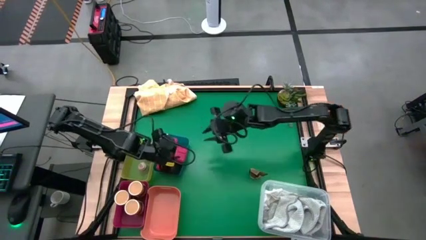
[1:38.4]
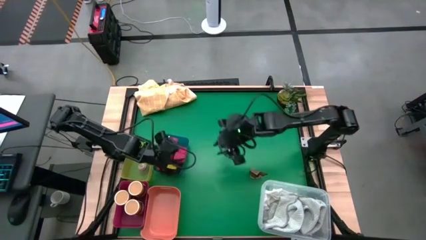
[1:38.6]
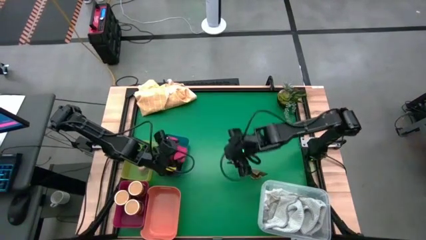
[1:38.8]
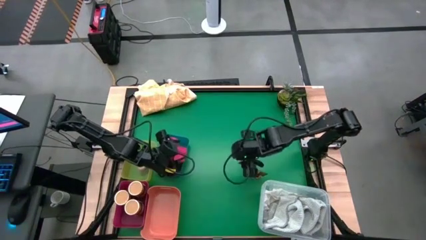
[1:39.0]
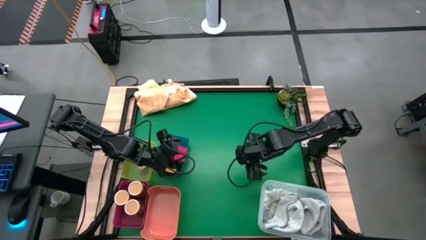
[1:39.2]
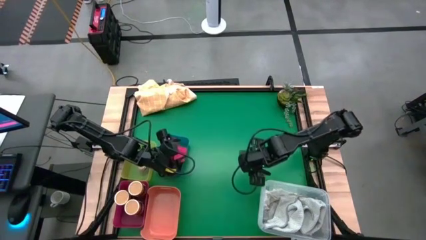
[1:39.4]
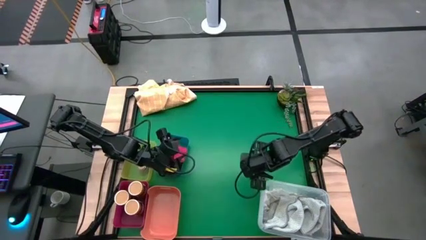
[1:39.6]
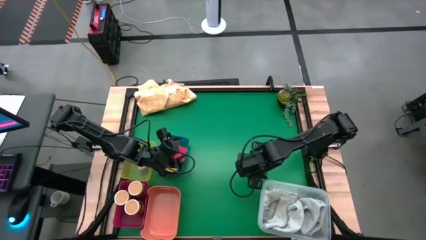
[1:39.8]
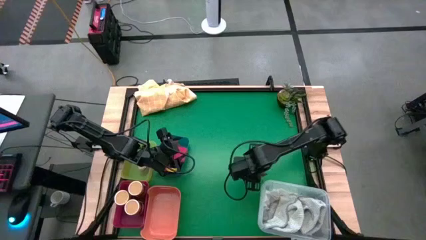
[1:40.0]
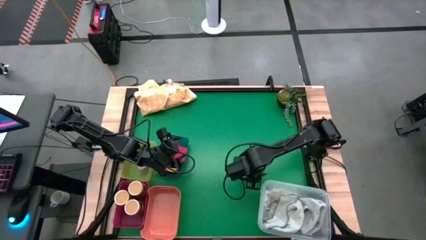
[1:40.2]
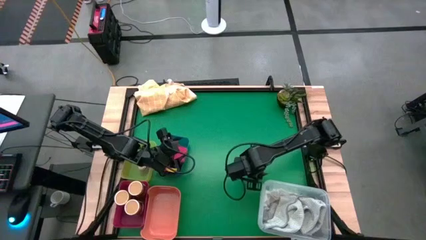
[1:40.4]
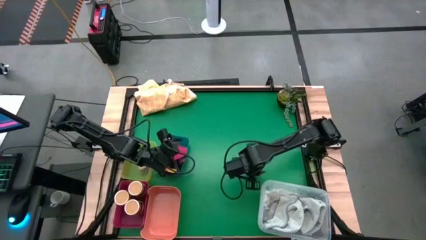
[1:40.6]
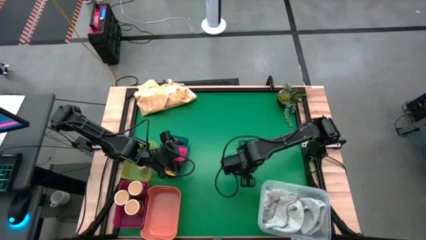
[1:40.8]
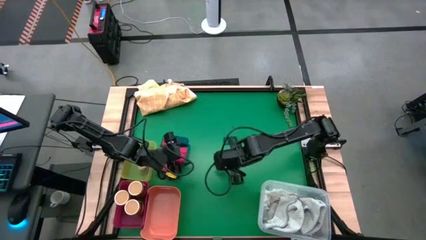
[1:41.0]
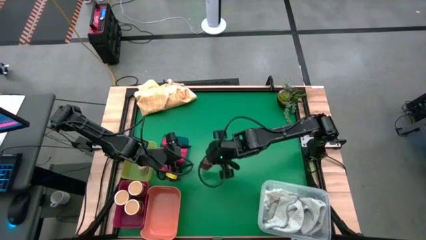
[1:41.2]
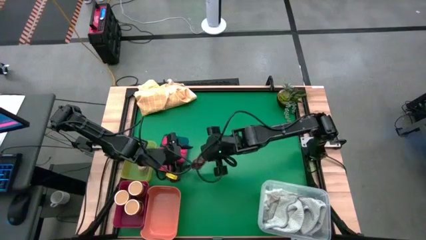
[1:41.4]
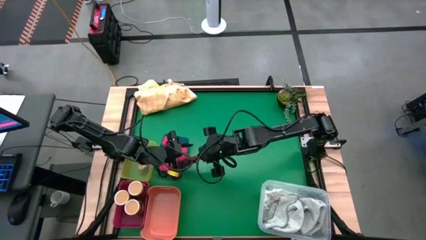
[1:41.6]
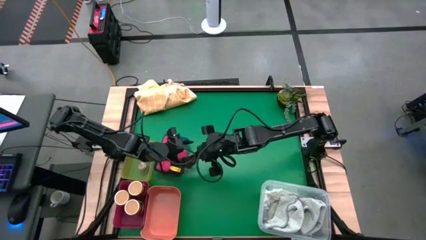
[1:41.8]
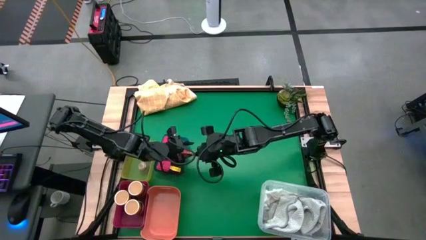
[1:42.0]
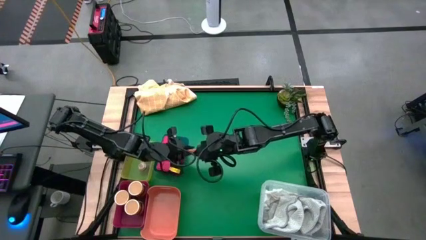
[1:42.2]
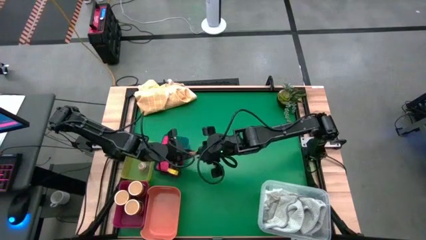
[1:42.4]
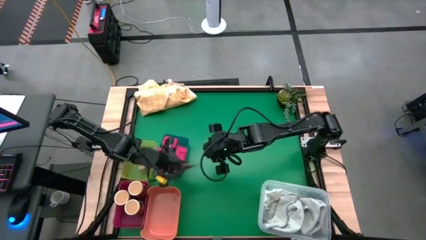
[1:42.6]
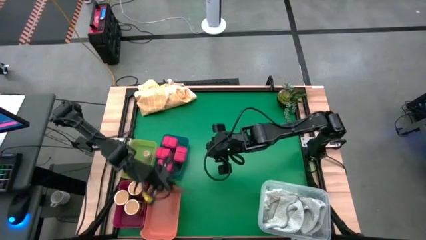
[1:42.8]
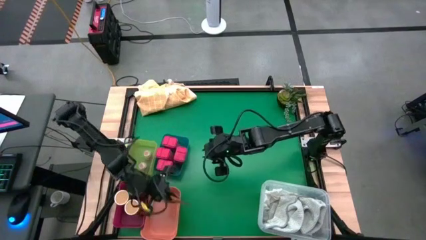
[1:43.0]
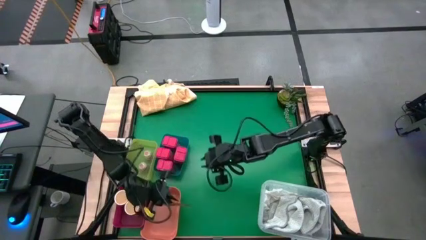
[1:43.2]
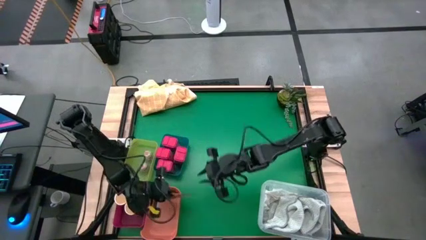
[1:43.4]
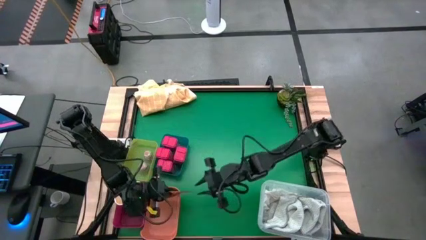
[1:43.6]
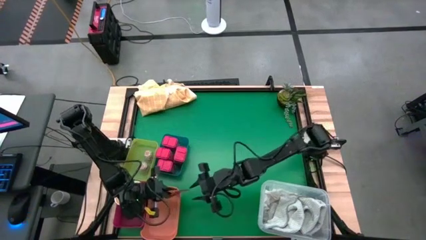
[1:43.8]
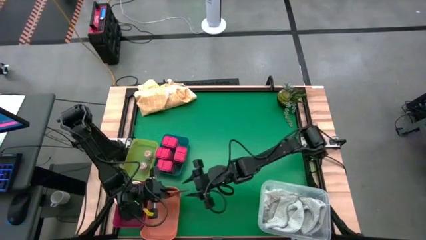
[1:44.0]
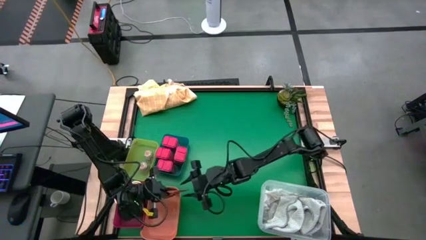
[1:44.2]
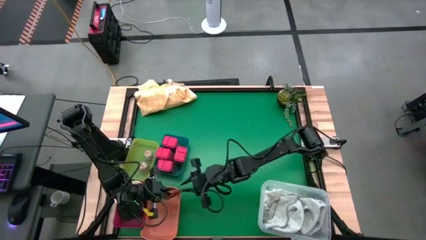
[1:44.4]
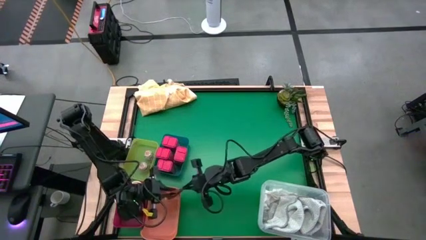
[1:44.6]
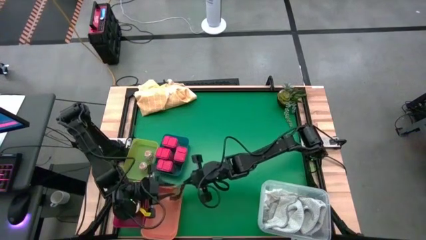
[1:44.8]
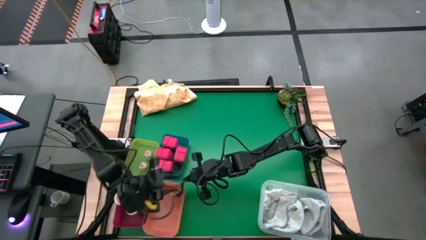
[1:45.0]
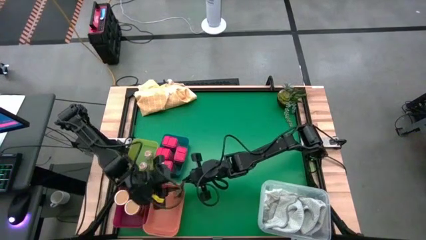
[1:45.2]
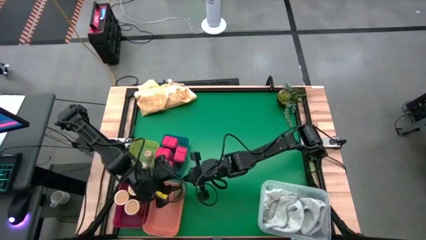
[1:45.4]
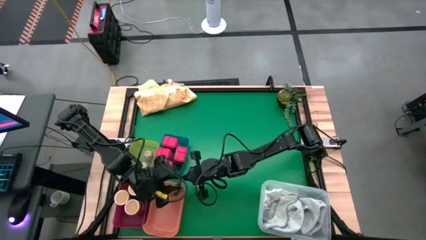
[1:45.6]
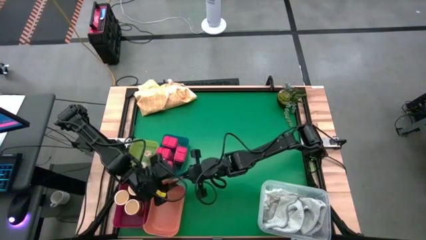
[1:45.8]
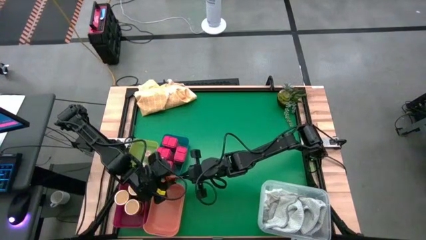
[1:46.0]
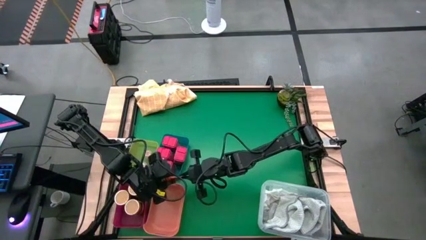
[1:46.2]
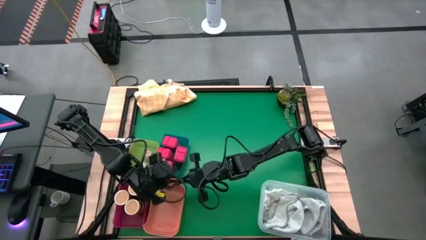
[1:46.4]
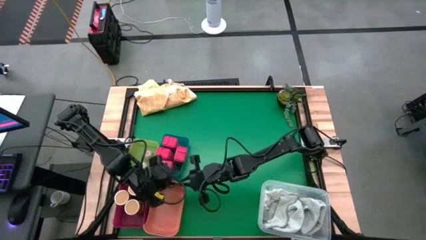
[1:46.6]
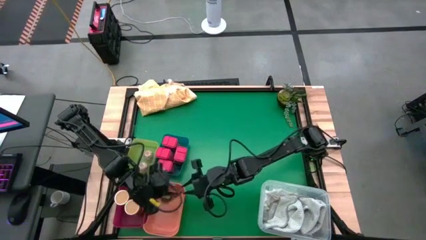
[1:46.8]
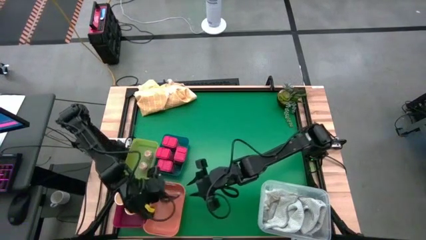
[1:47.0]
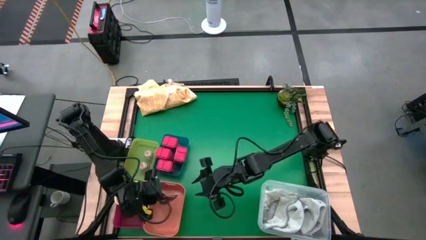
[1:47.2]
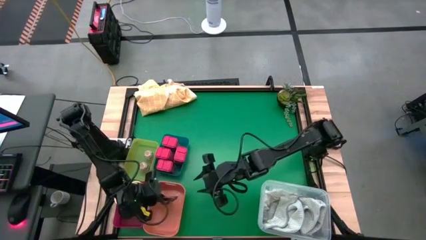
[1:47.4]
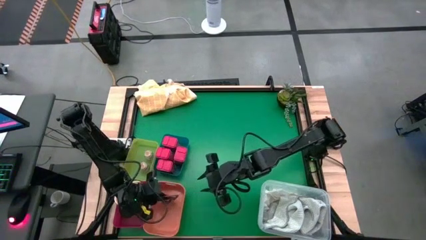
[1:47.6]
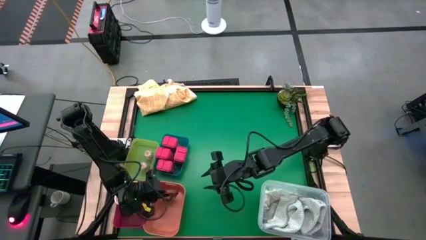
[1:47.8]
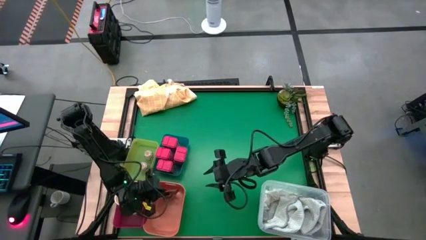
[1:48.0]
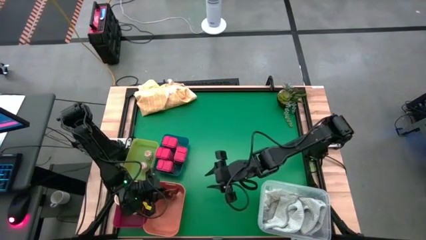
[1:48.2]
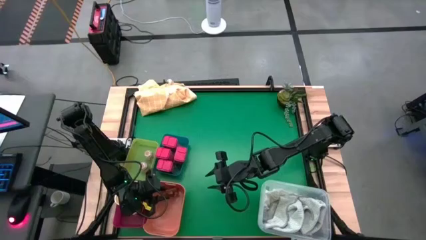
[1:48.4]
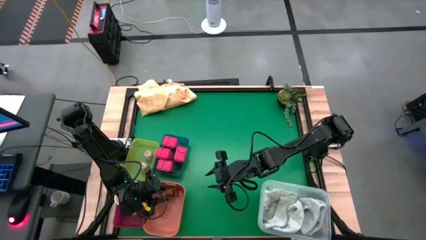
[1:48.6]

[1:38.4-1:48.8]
Task: Sort spices by type
Put the orange seasoning pack into the orange bin

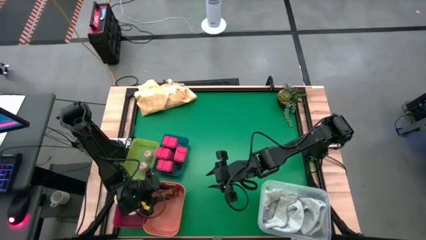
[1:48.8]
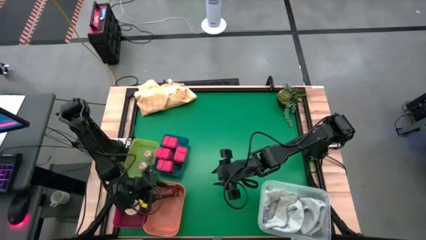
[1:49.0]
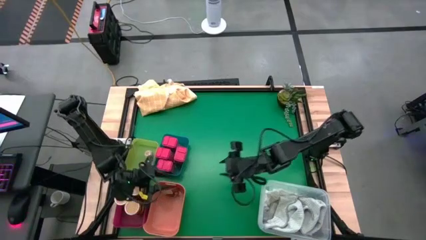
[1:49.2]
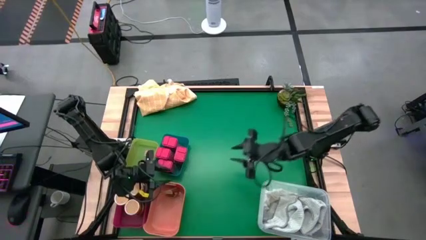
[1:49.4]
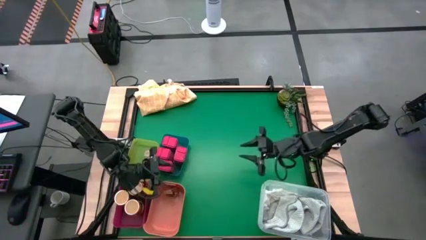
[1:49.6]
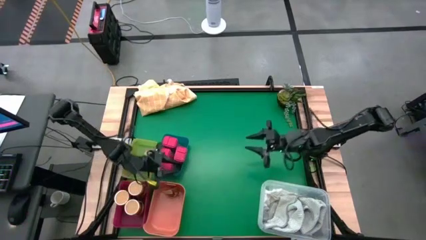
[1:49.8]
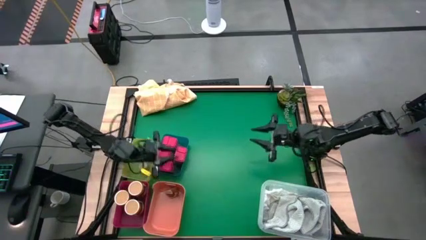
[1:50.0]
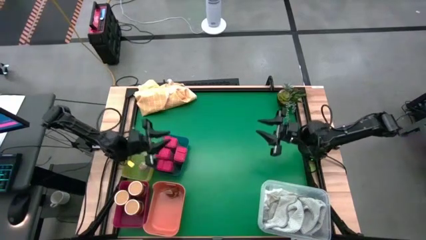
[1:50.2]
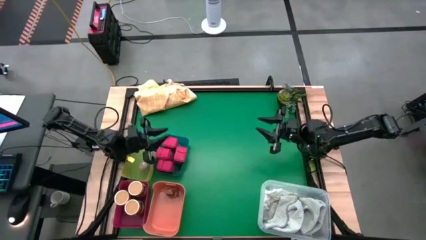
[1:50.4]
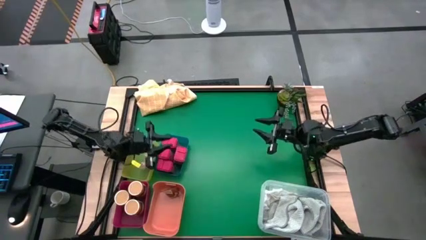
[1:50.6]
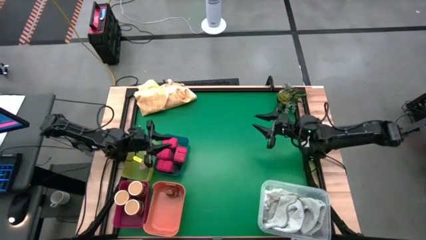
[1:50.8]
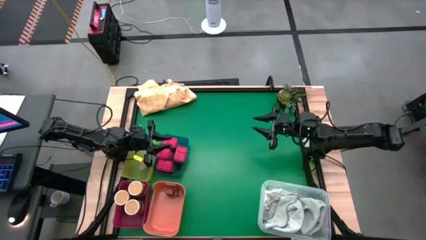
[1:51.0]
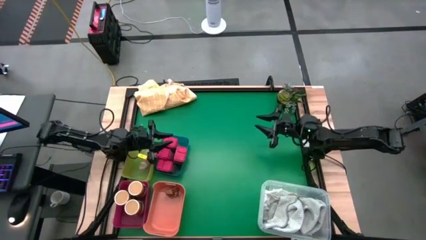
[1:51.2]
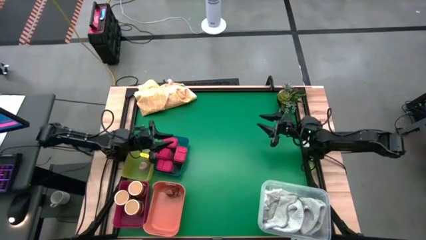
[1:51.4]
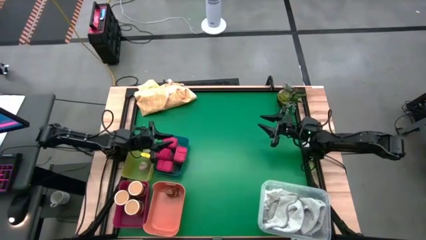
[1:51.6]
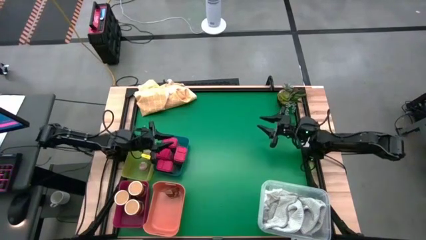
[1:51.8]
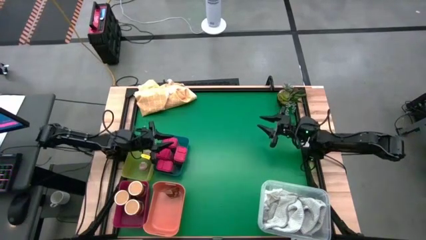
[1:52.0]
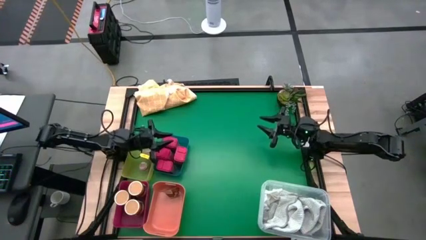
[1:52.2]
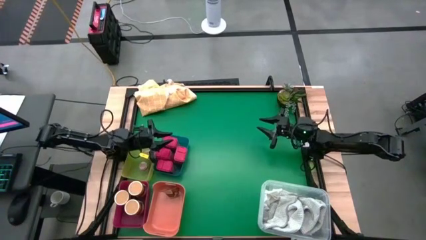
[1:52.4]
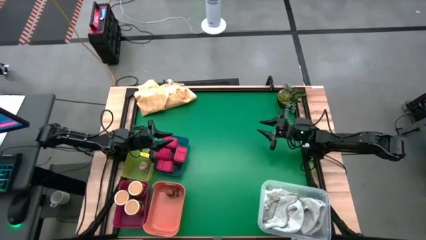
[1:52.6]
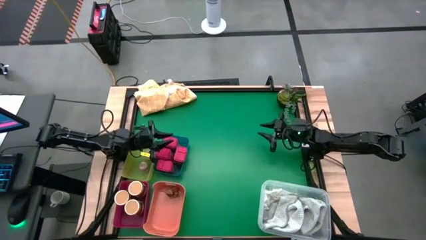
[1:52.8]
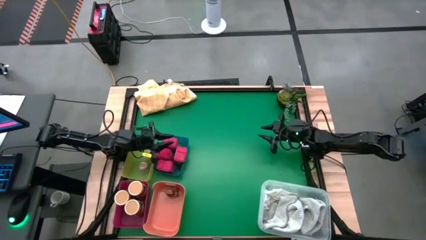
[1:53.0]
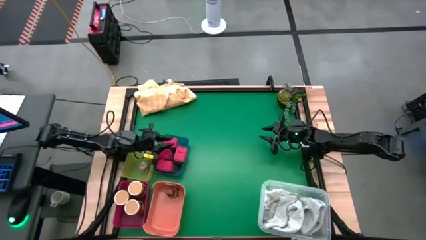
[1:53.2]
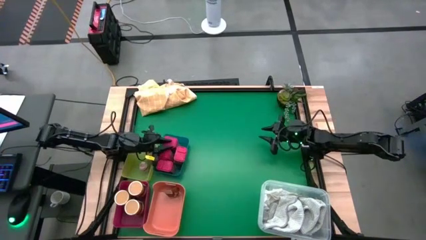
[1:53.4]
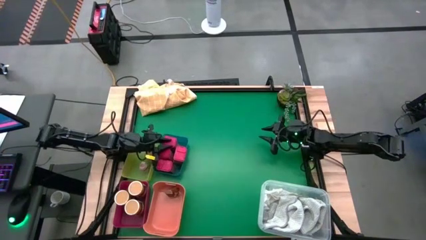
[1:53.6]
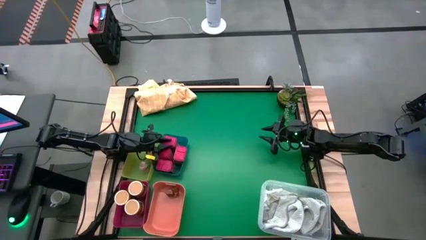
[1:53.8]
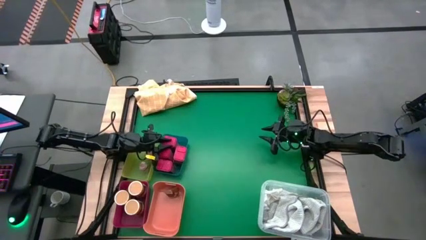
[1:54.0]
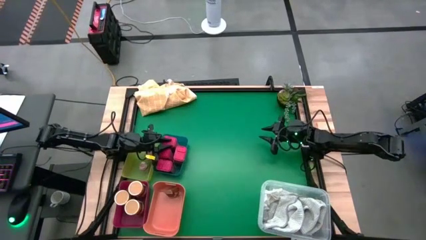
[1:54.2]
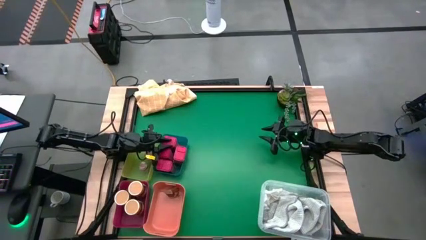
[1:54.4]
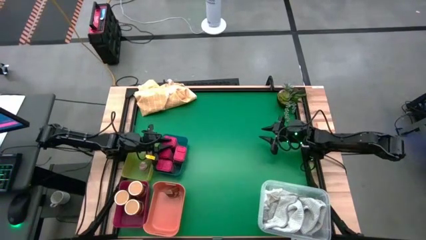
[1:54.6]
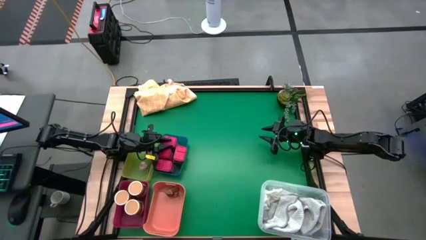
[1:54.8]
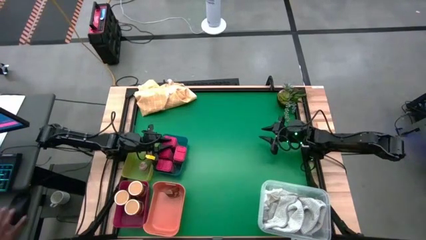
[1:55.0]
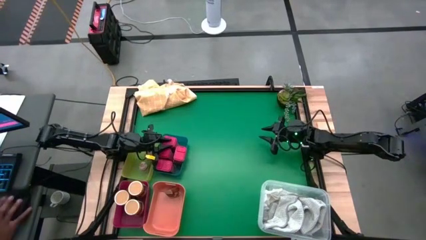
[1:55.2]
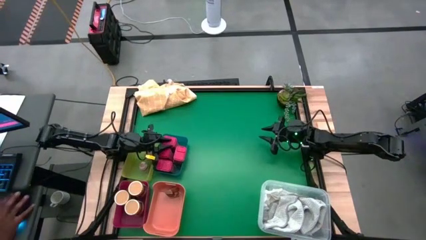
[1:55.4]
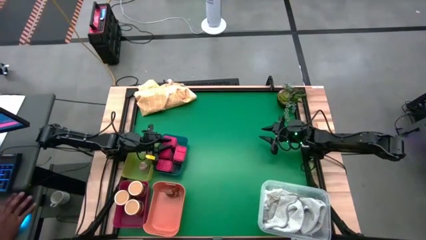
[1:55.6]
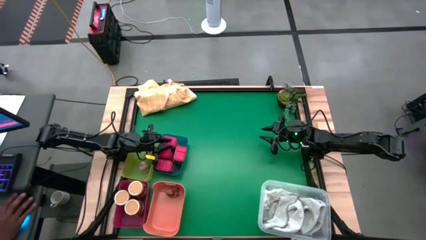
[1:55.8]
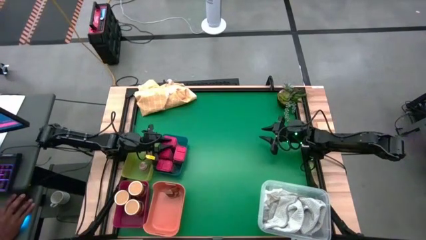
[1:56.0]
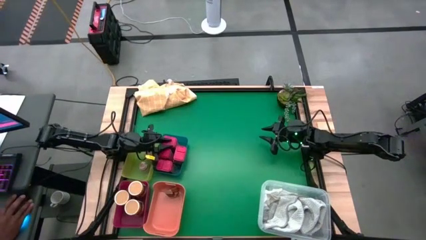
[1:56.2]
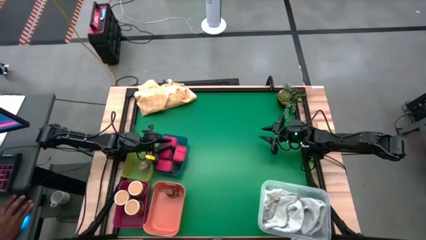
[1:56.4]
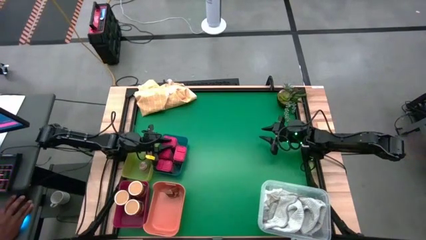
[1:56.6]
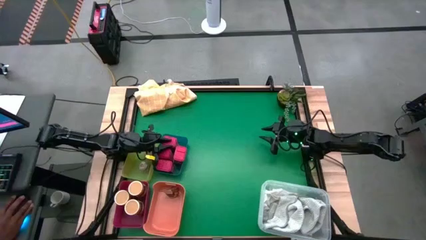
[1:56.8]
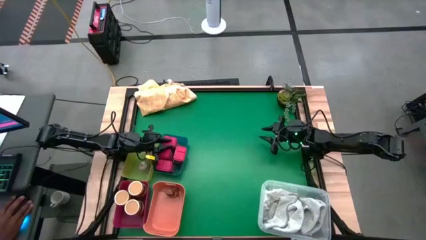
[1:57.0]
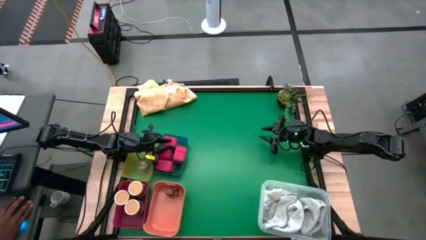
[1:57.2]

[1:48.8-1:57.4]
Return to Home Position
